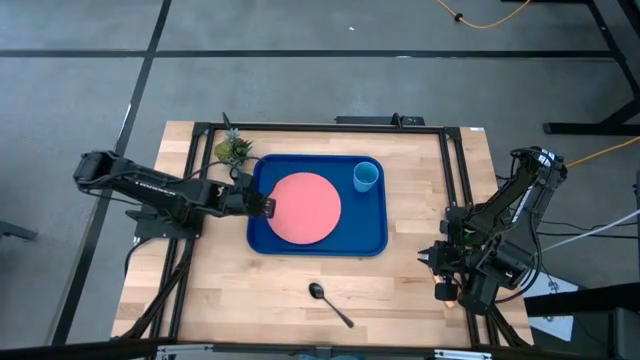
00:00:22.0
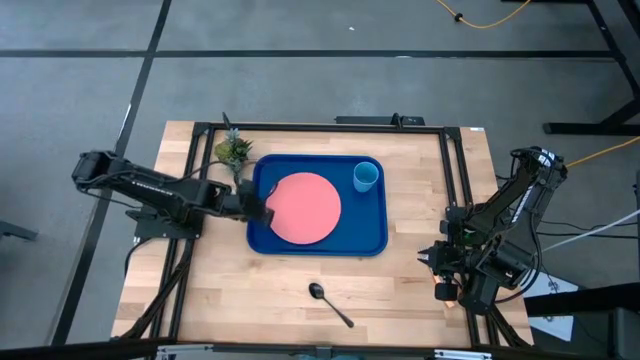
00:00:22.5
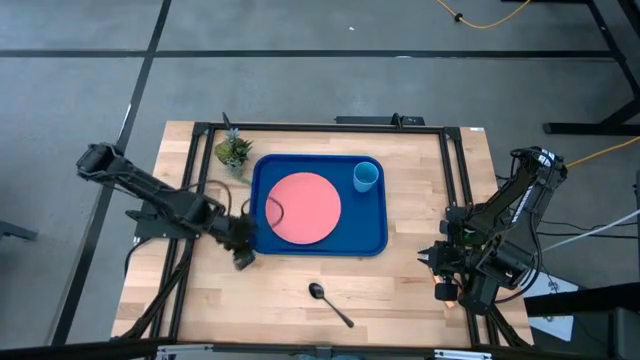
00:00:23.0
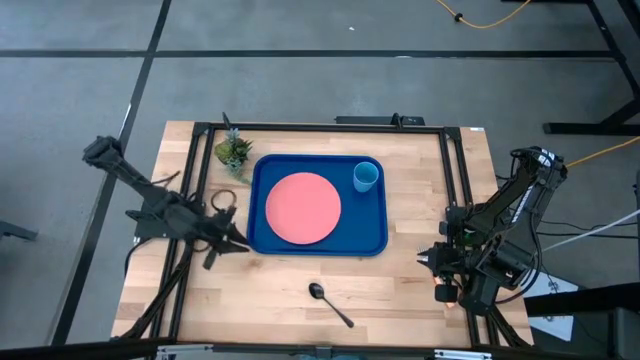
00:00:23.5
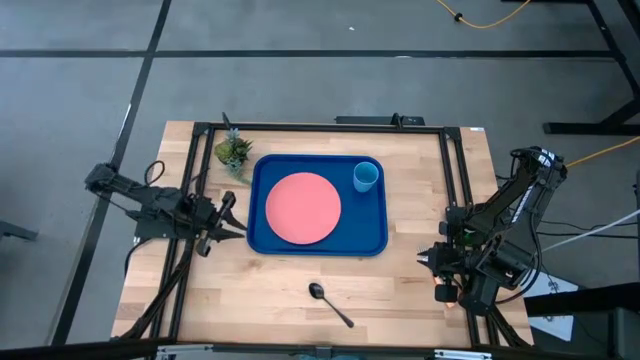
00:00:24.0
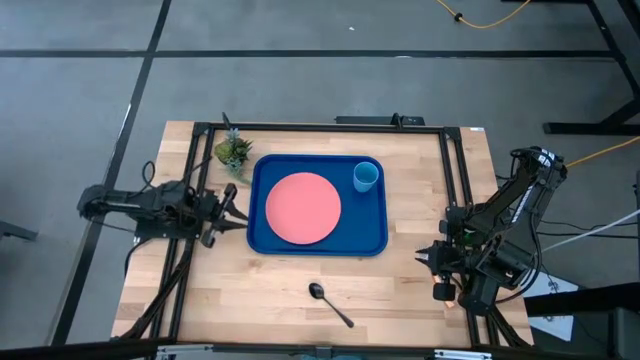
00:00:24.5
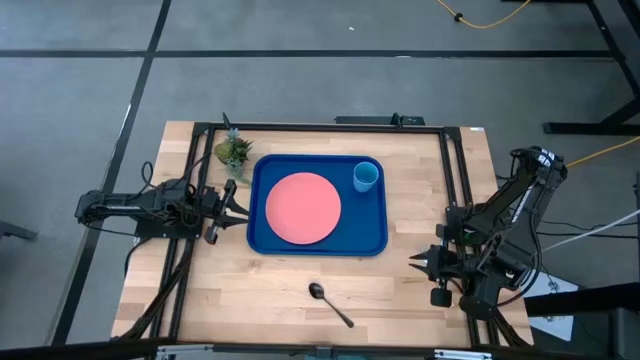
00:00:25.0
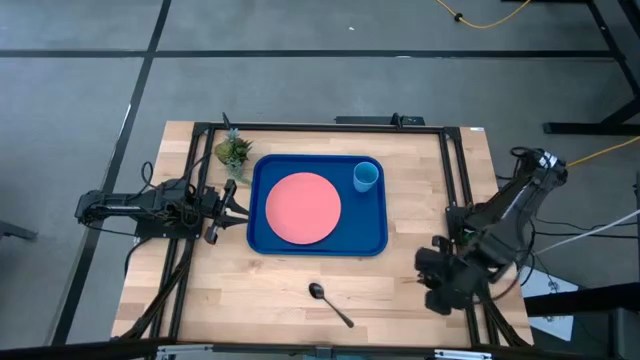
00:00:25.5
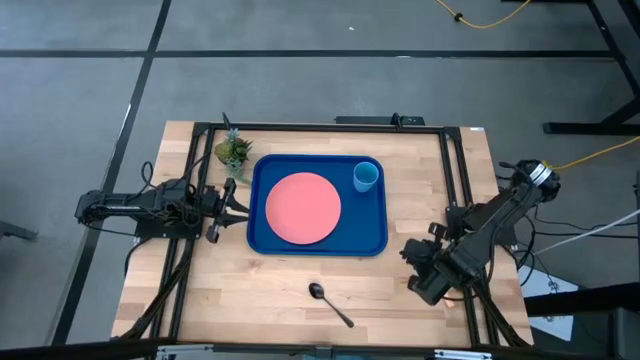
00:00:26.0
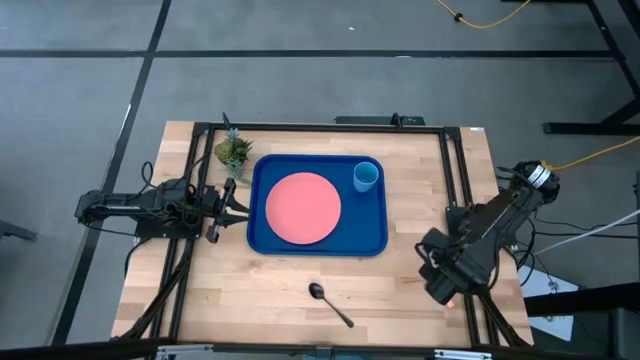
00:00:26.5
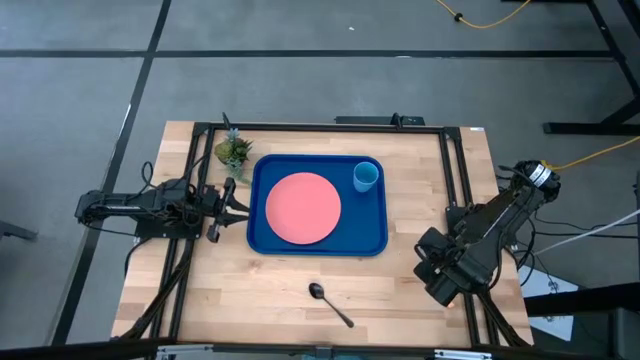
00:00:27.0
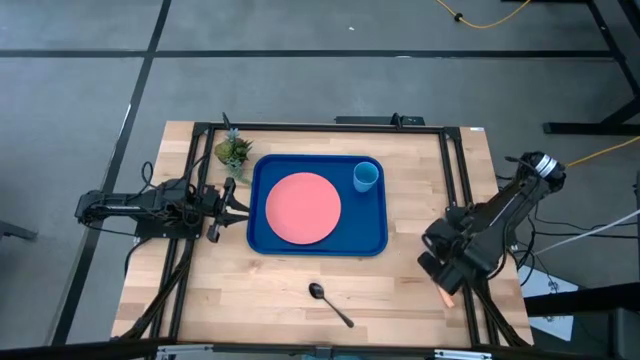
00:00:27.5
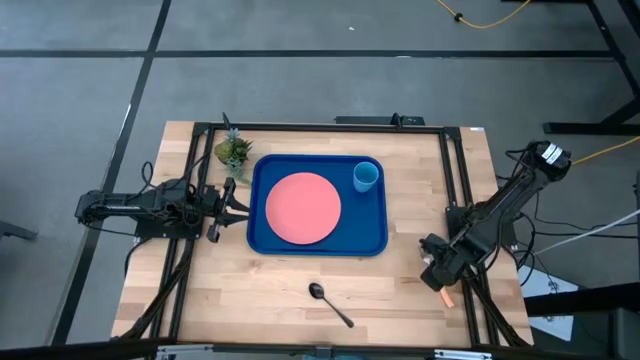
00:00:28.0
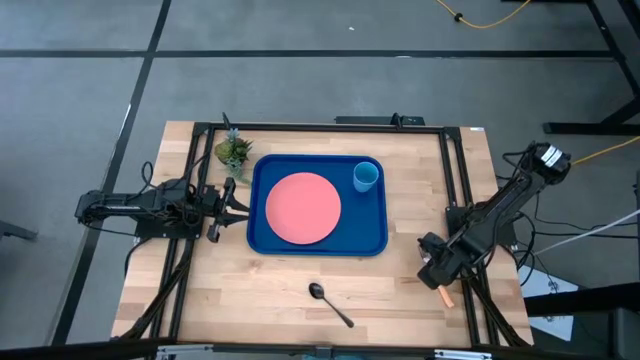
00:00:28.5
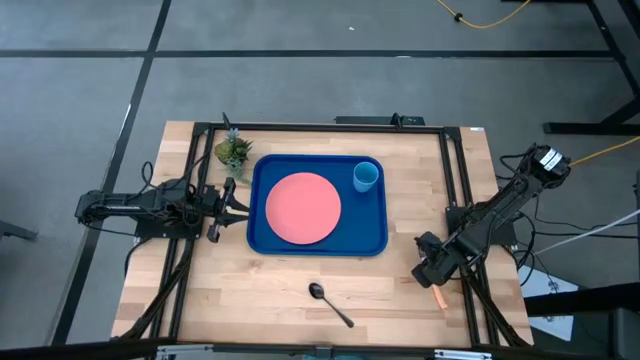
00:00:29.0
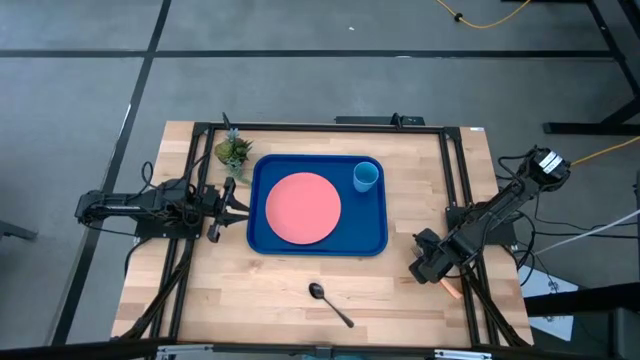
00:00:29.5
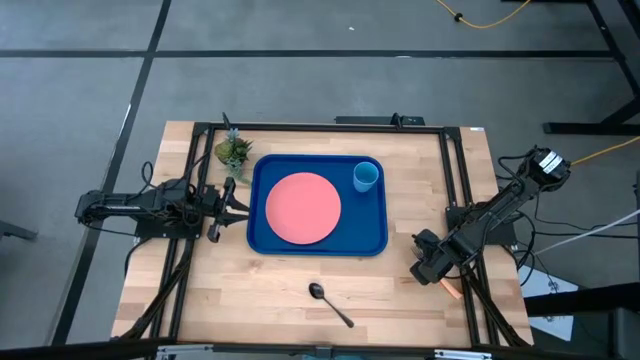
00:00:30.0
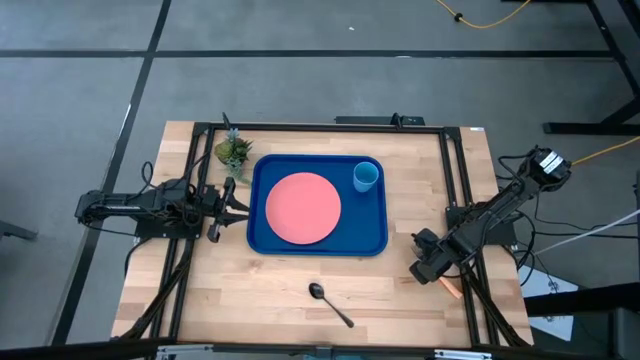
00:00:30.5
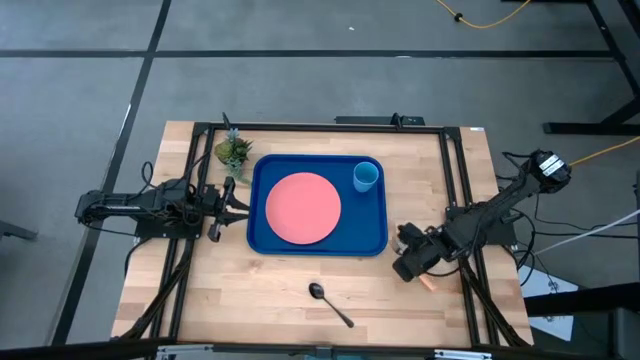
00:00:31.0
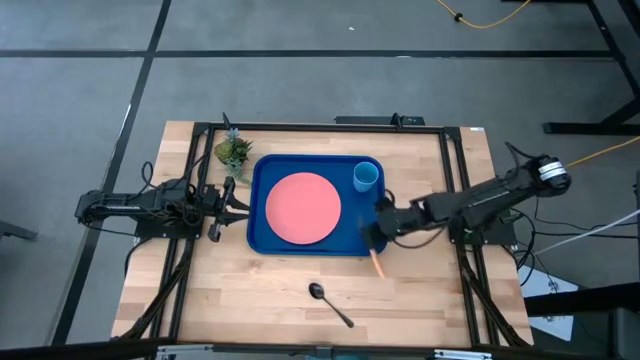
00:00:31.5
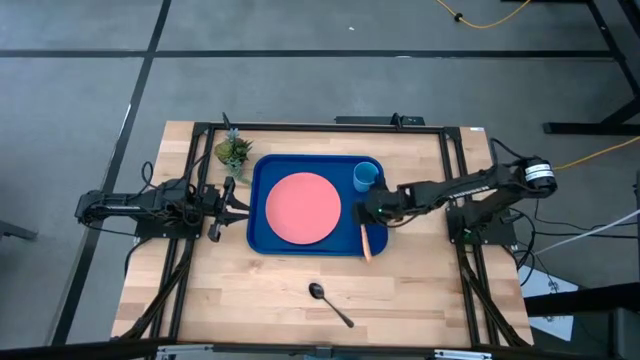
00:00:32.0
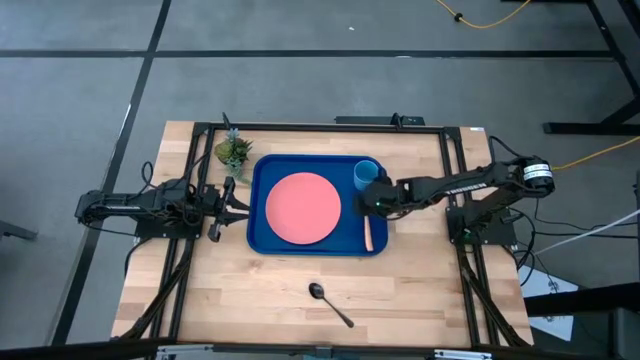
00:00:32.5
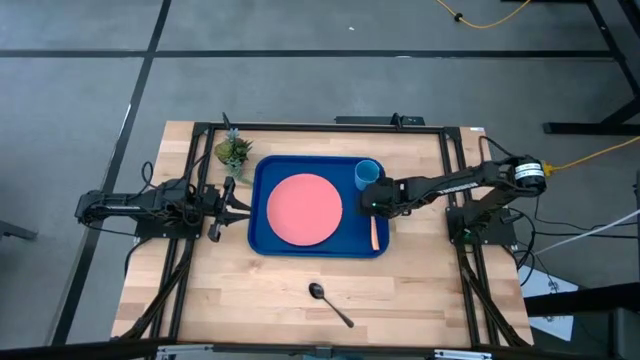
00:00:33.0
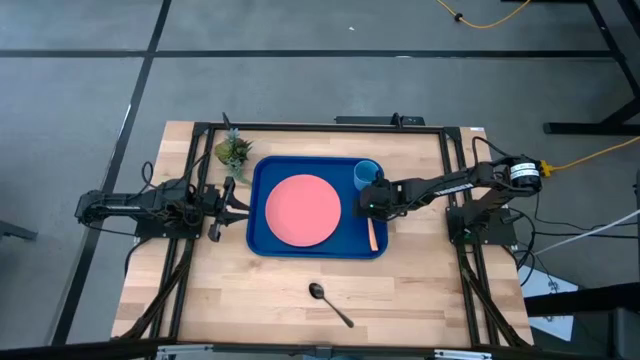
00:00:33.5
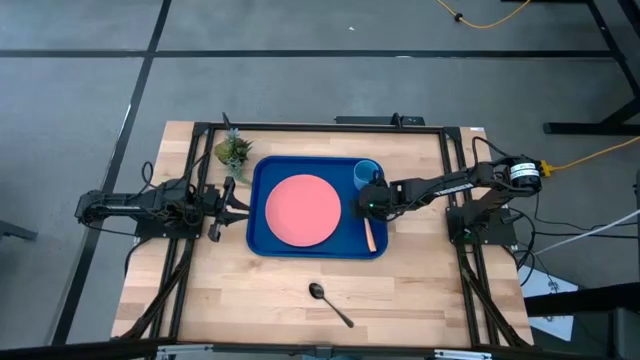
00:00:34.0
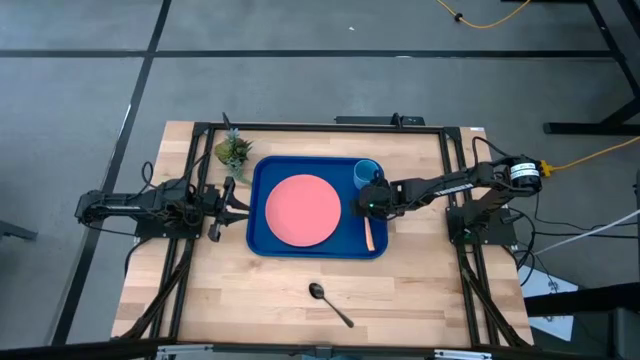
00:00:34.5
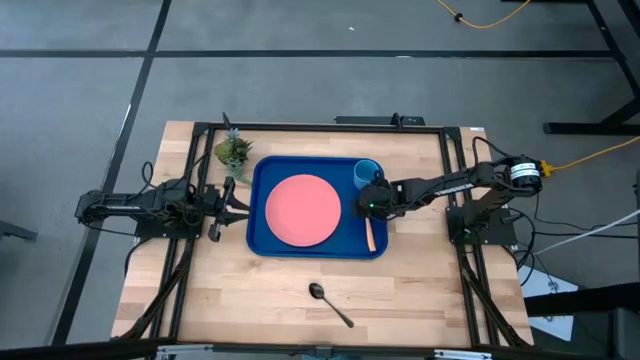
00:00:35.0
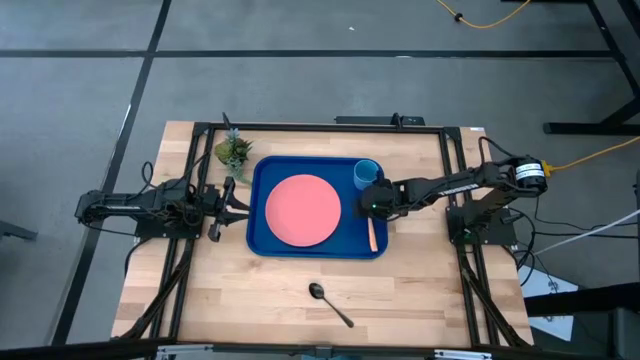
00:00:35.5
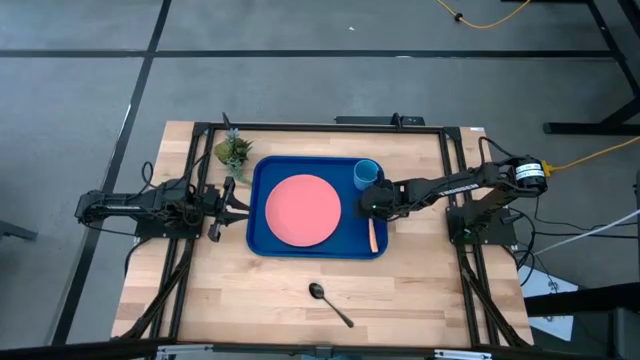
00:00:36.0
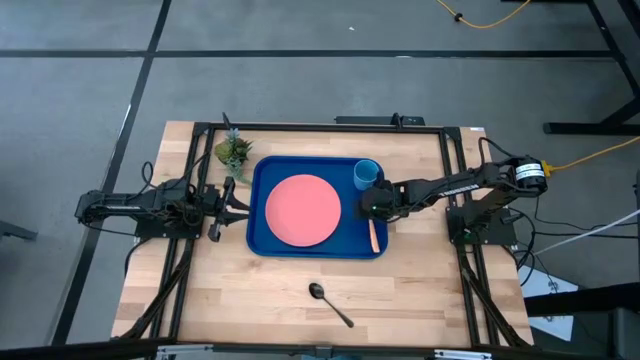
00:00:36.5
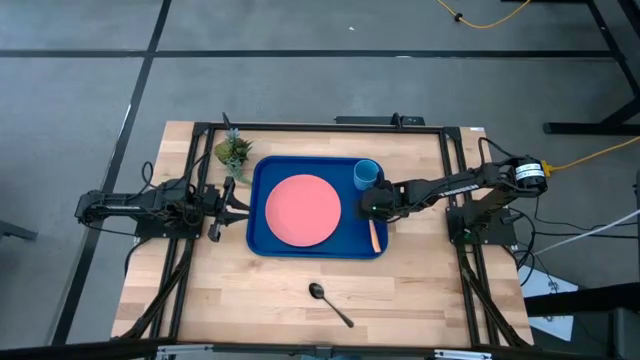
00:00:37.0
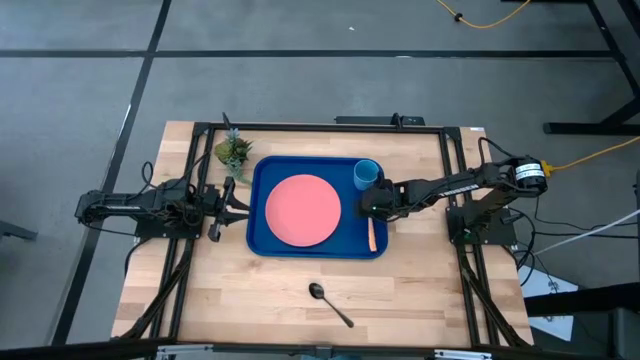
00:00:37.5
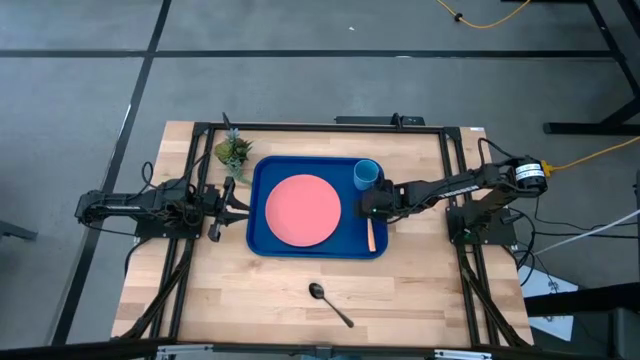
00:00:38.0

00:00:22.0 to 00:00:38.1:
Task: Pick and place plate/cup/fork/spoon on tray
Put the brown fork on the right side of the pink plate on the blue tray

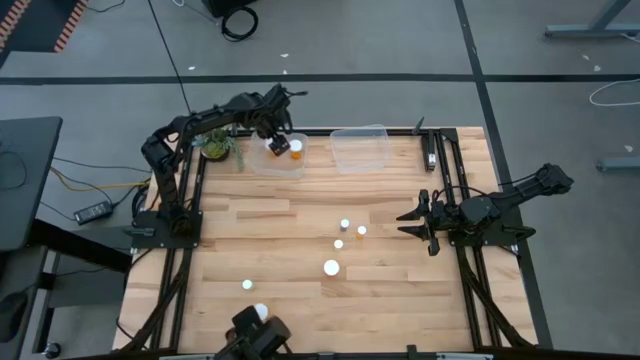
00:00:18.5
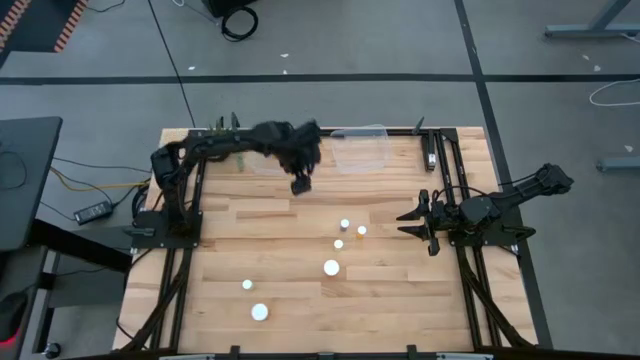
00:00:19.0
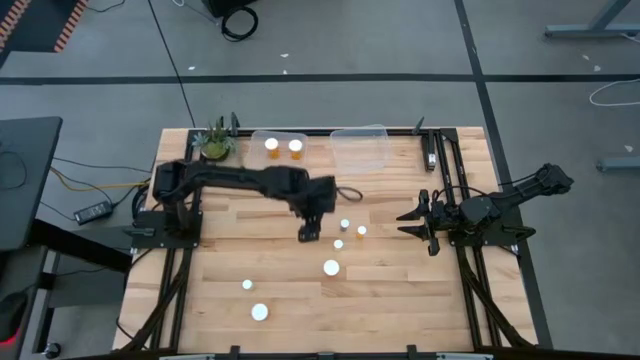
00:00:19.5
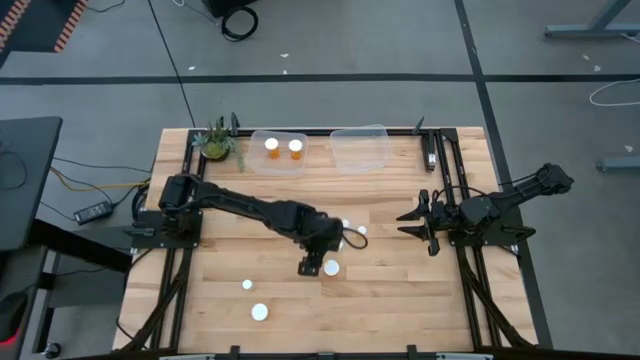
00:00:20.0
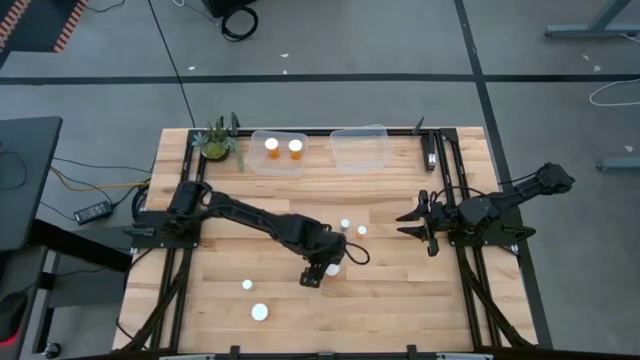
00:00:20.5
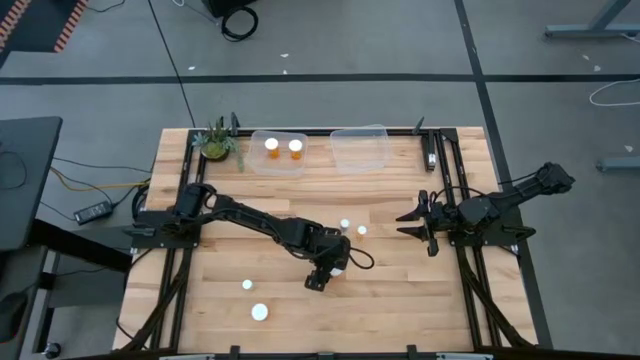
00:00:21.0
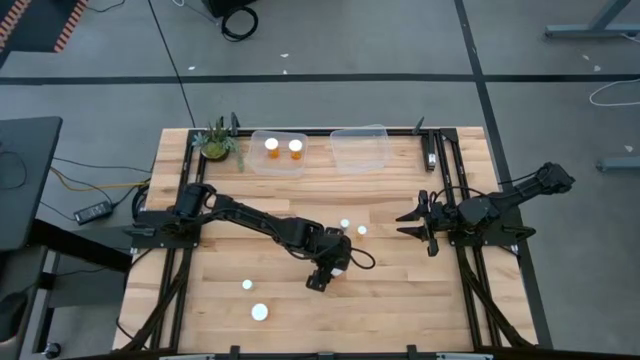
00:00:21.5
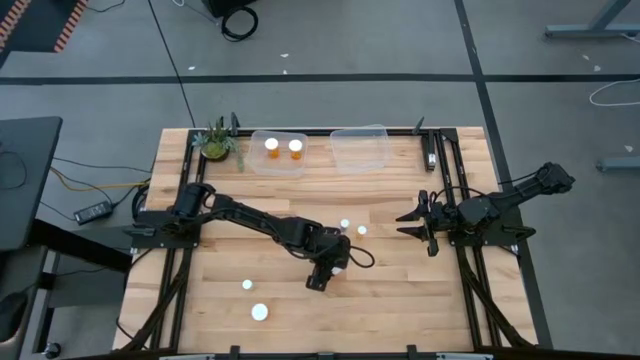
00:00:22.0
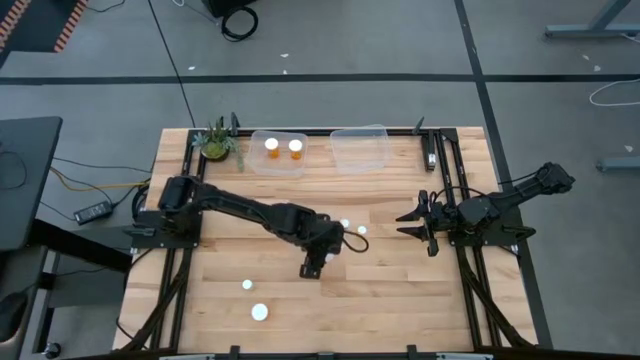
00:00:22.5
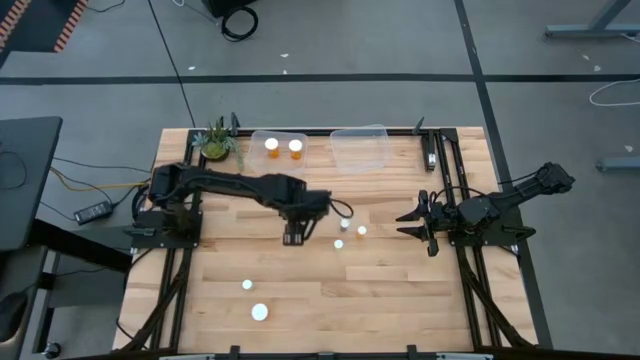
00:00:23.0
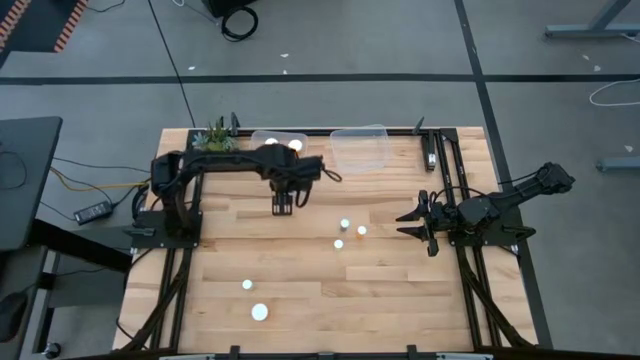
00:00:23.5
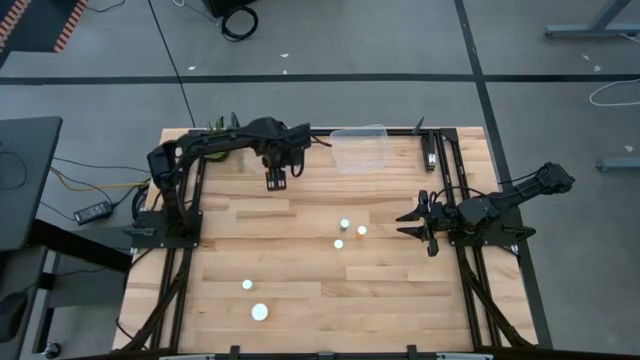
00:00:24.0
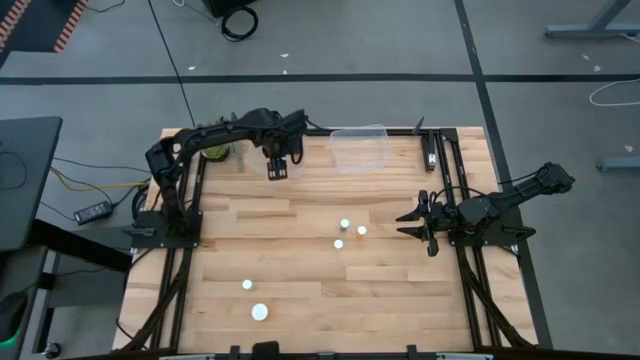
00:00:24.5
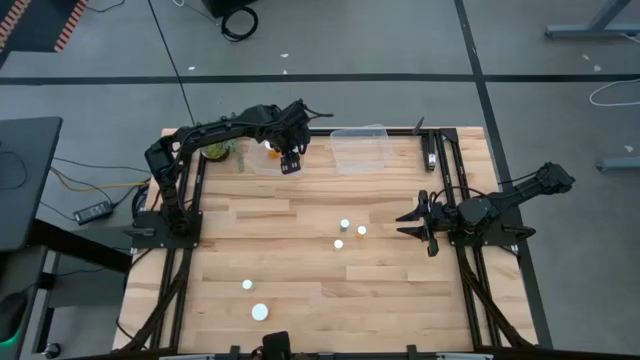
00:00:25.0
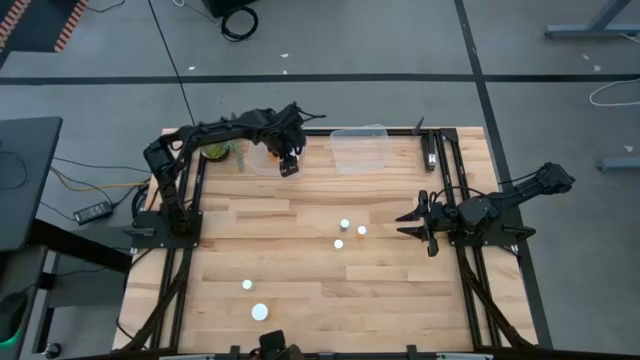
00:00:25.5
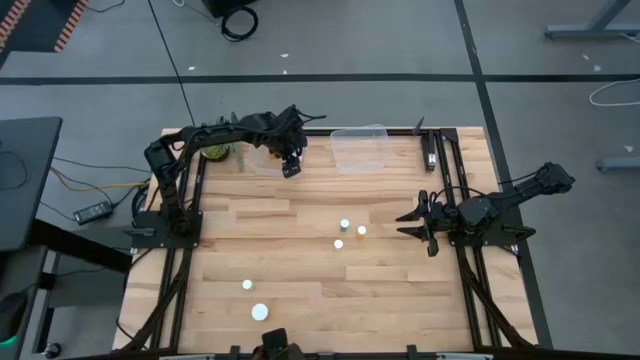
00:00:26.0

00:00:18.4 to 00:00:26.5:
Task: Pick and place medicine bottles into bin by pill shape (circle, oval)
Put the top large orange pill bottle into the left bin
